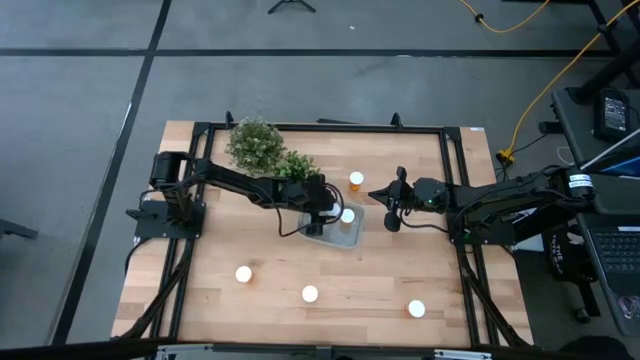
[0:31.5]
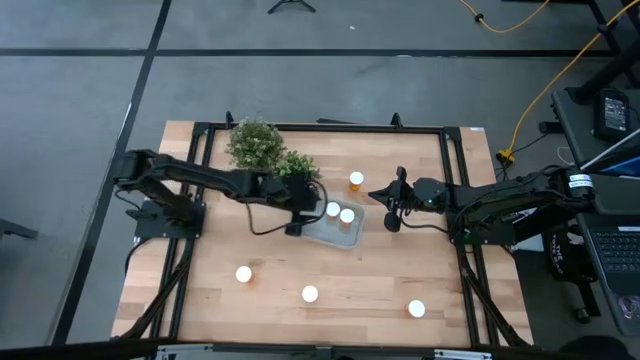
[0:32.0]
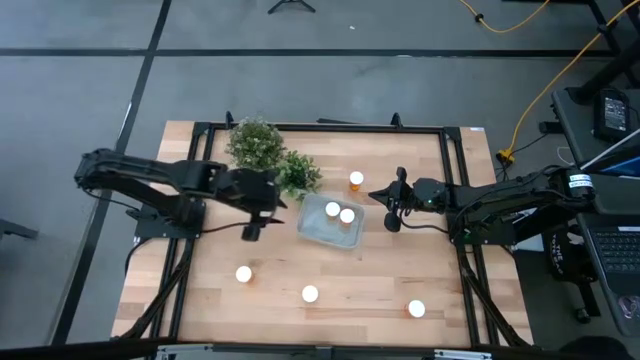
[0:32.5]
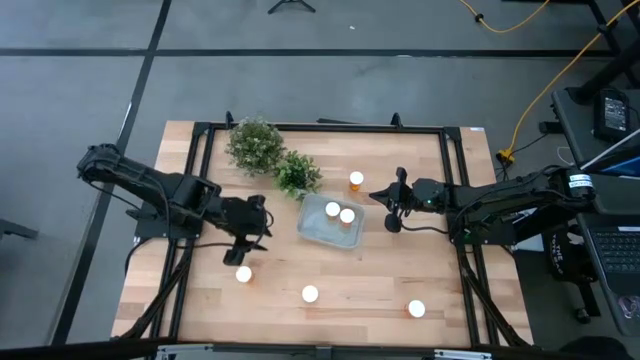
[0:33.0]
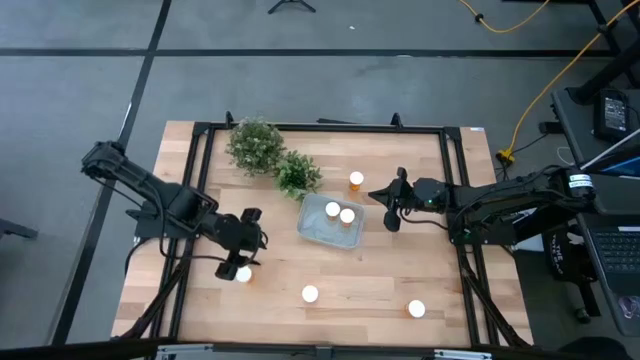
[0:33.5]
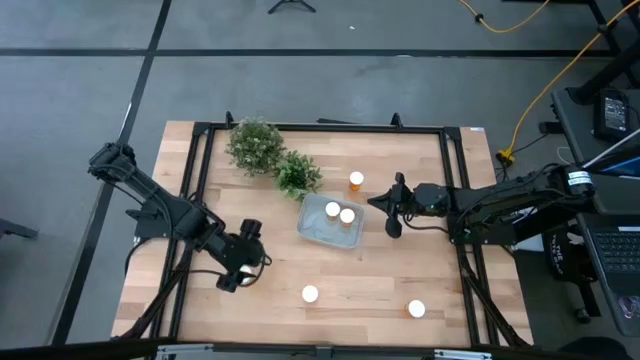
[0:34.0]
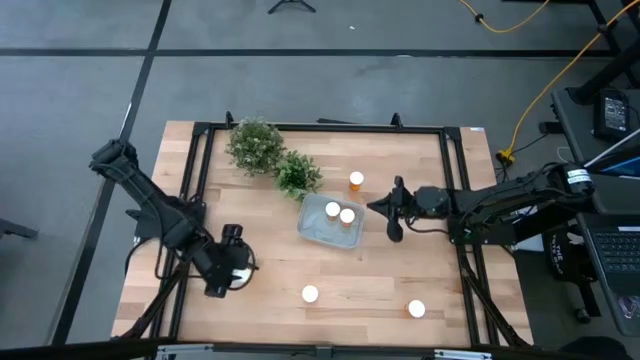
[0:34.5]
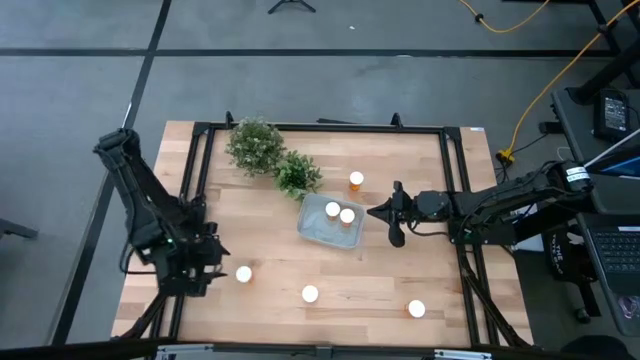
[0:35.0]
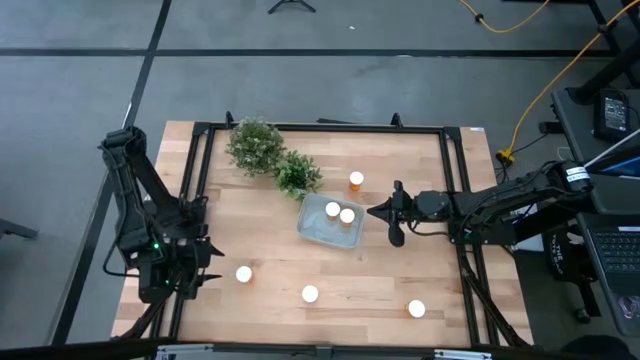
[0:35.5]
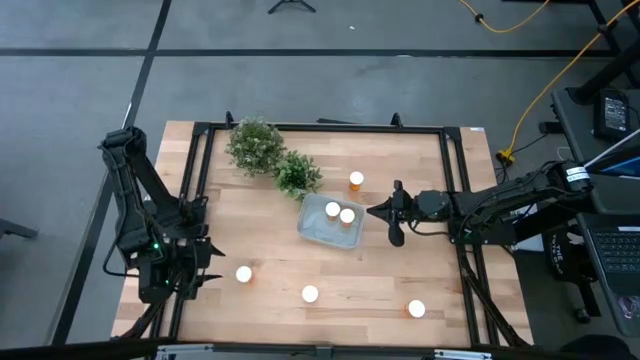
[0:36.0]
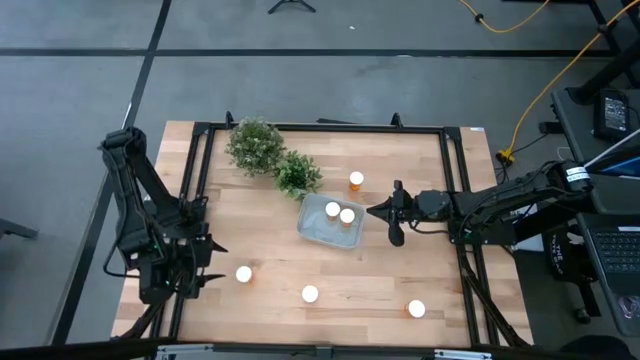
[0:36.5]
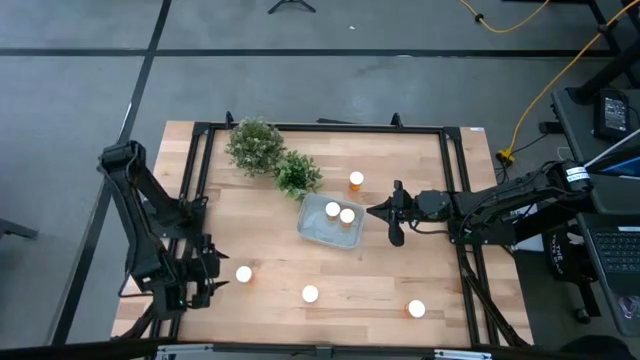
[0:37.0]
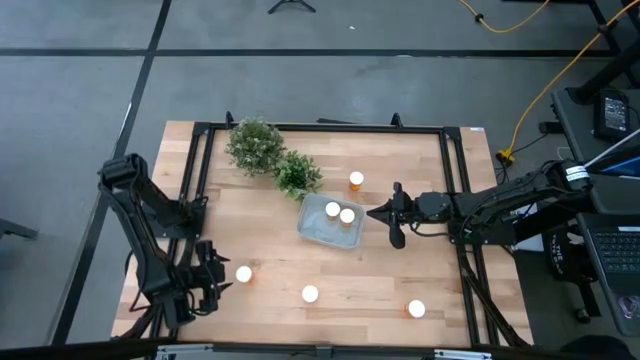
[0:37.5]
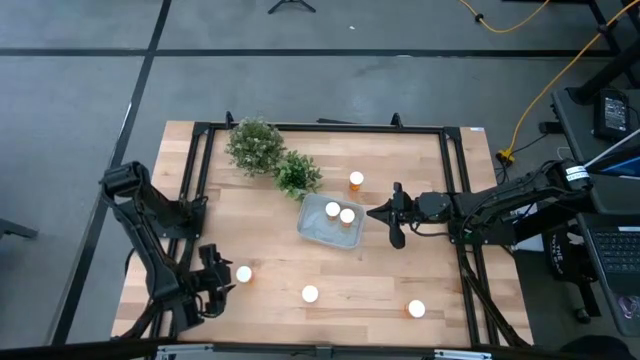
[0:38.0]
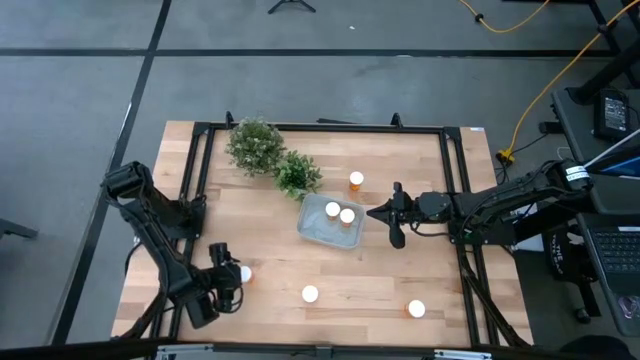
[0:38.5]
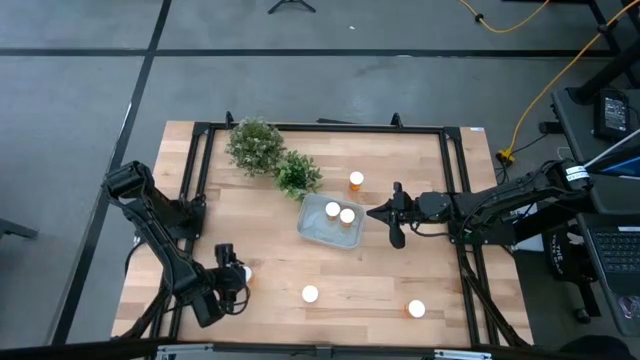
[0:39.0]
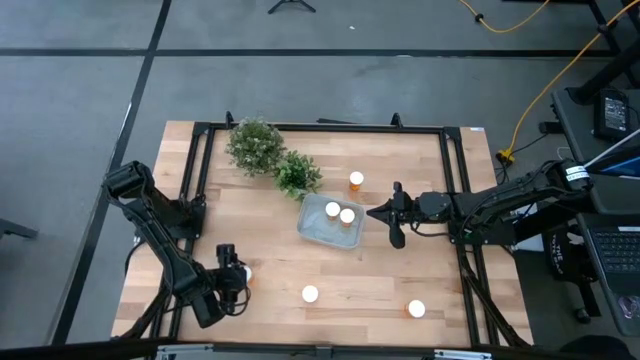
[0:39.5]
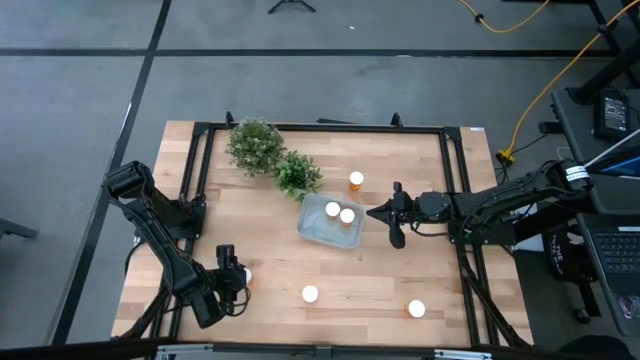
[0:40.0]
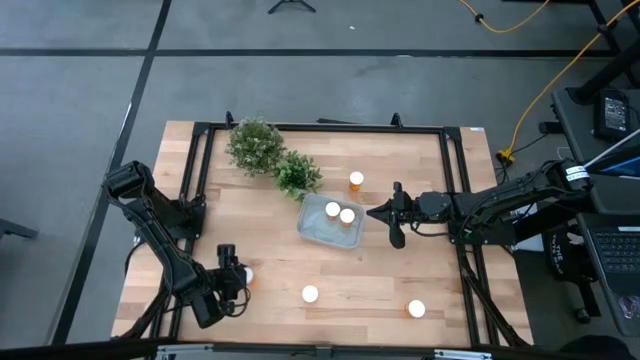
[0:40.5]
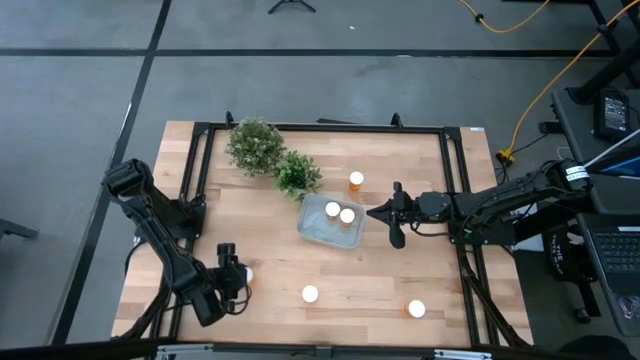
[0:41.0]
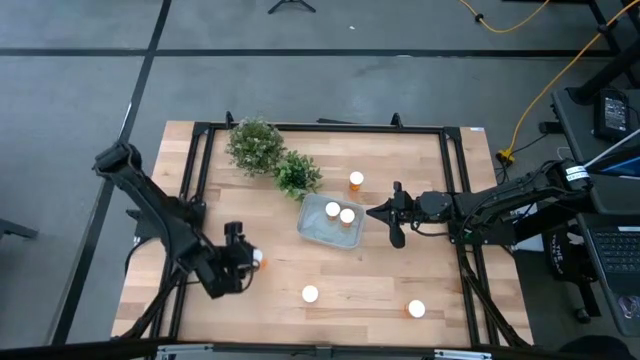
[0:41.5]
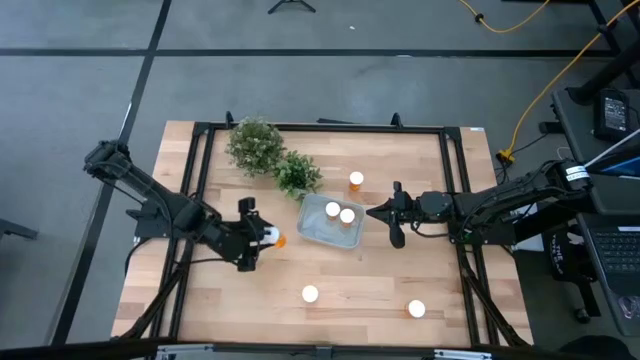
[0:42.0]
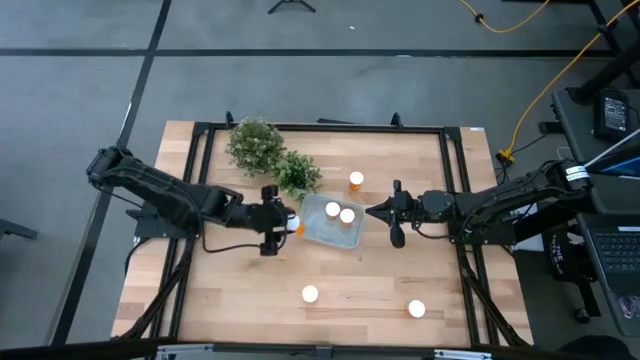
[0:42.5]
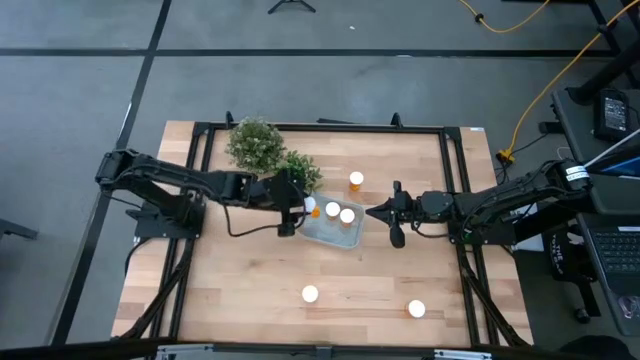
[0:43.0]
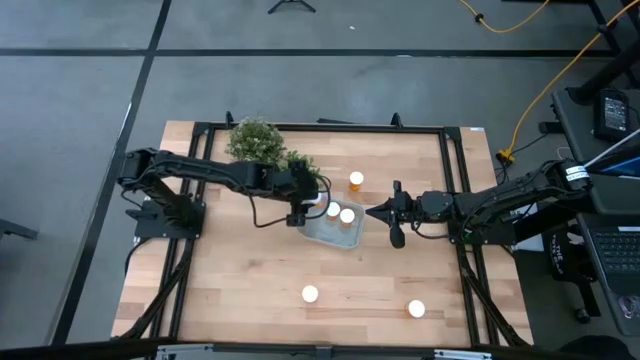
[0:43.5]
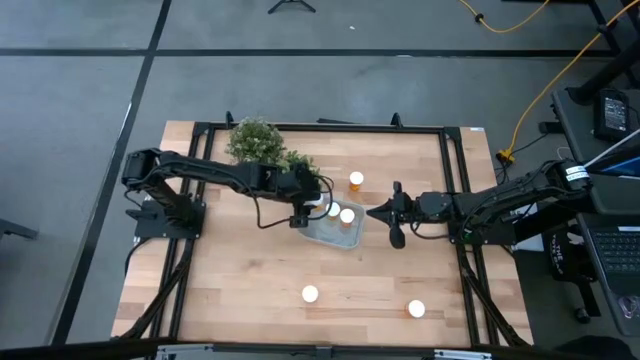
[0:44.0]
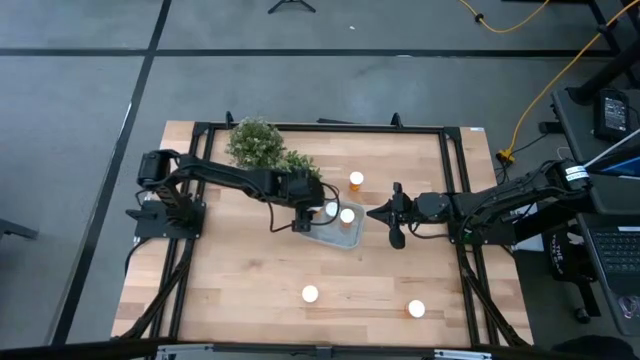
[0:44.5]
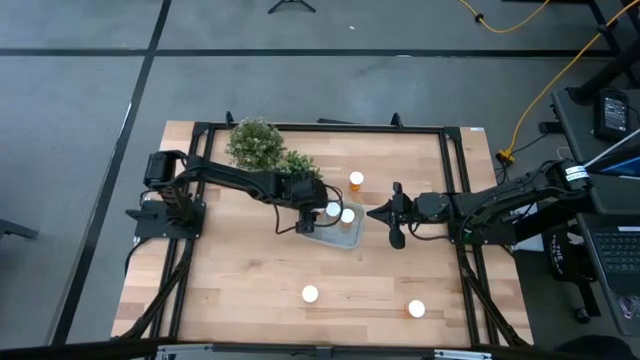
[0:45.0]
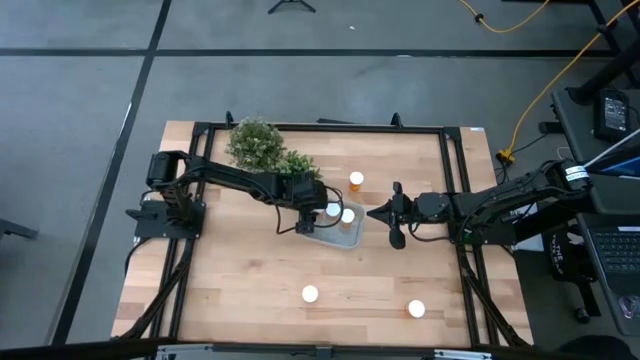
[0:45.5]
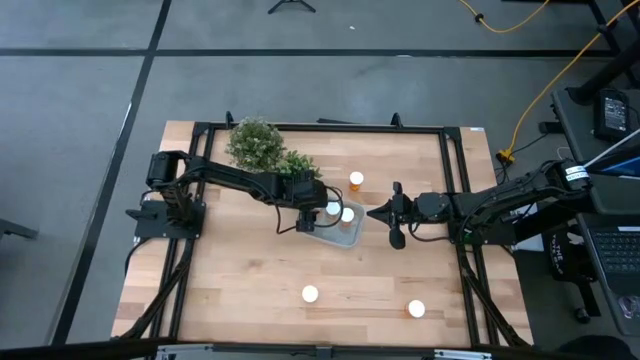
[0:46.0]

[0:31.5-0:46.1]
Task: Pick and place pill bottles into a basket
Put the orange pill bottle into the grey bin

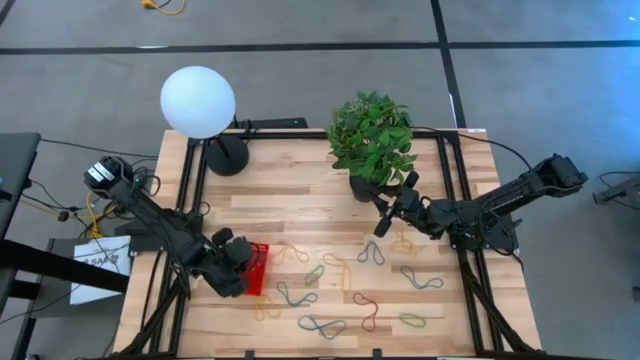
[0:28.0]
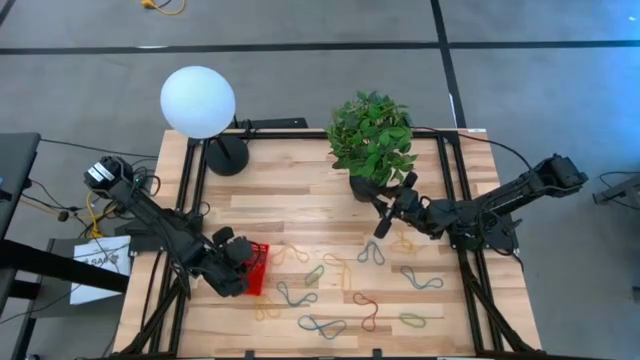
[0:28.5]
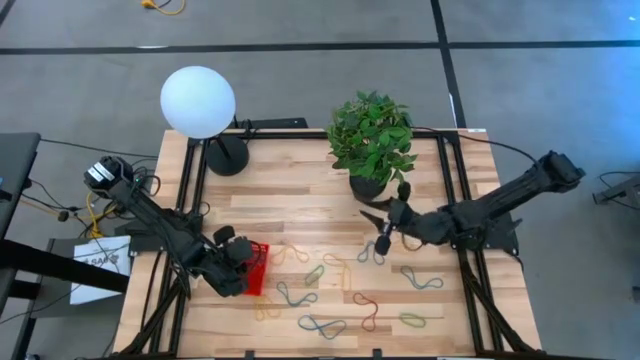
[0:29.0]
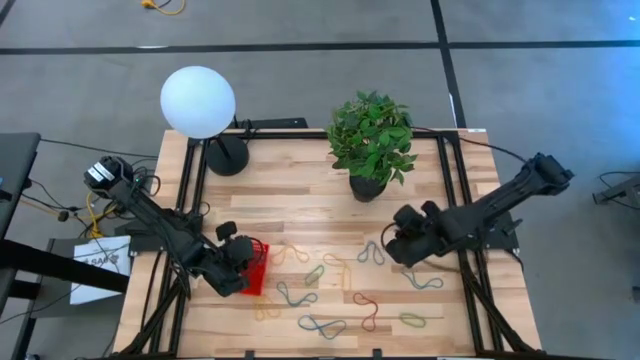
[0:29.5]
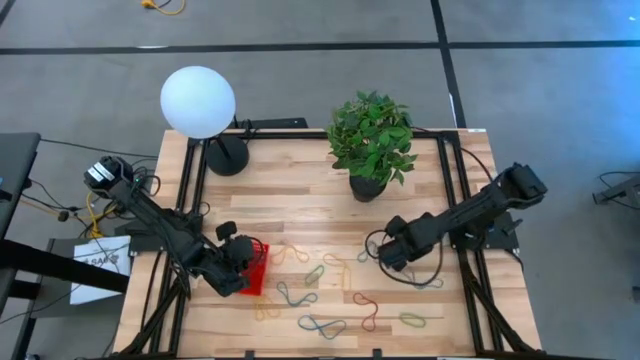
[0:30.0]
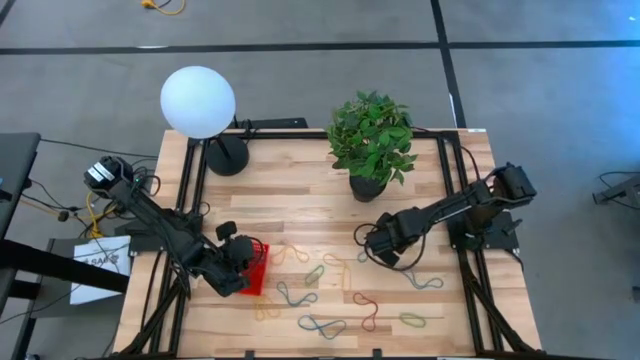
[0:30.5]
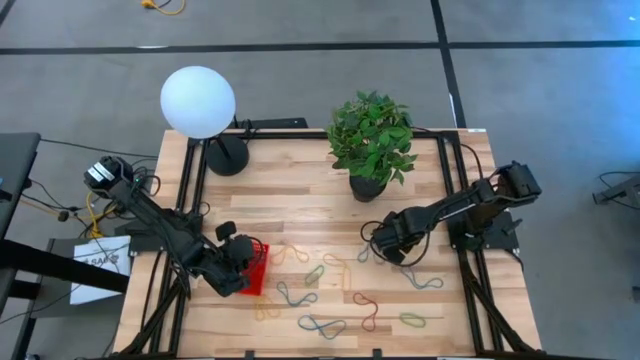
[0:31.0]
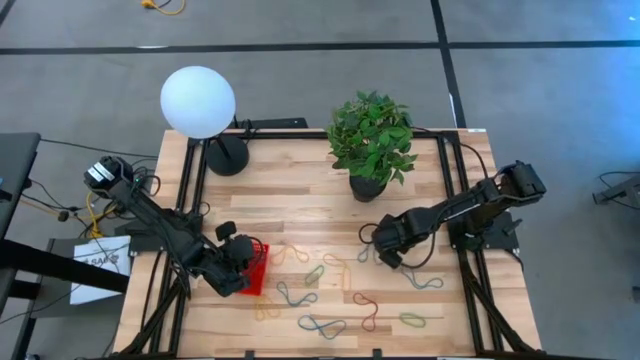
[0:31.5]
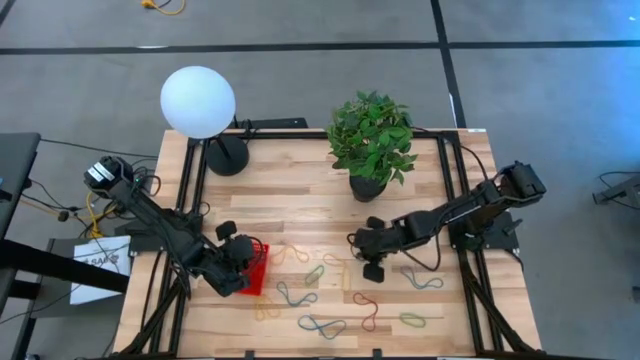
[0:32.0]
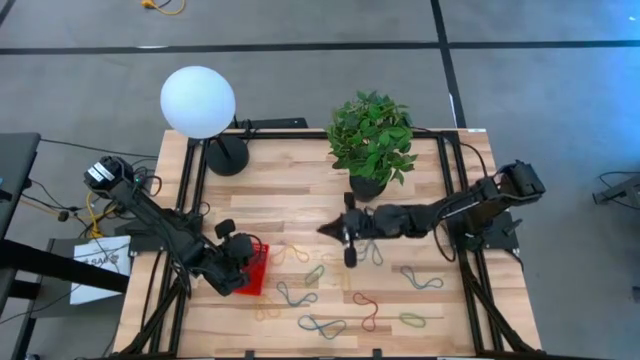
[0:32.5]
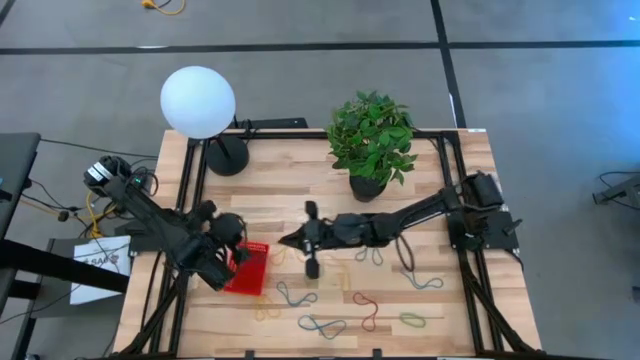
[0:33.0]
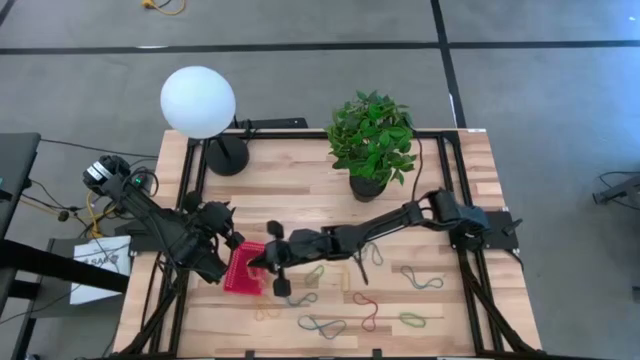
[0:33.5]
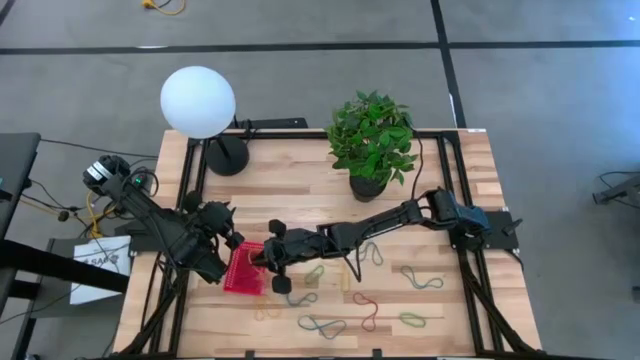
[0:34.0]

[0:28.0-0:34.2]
Task: Pick and place items into bin
Put the yellow rubber band into the red bin
